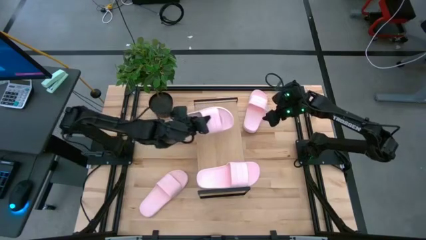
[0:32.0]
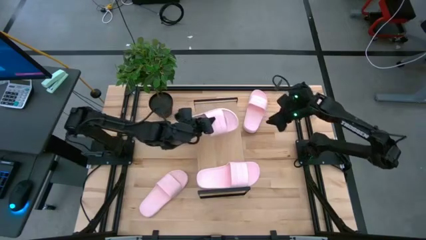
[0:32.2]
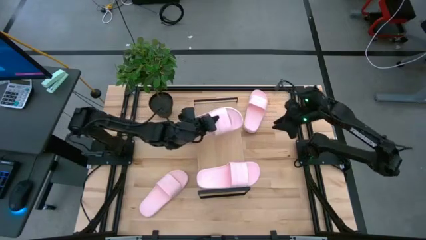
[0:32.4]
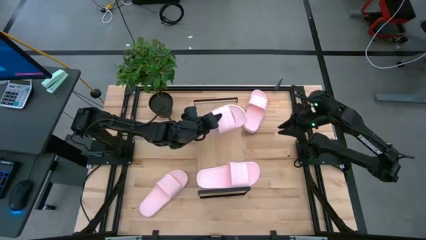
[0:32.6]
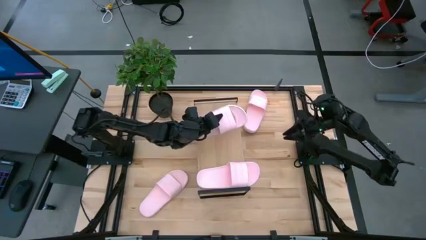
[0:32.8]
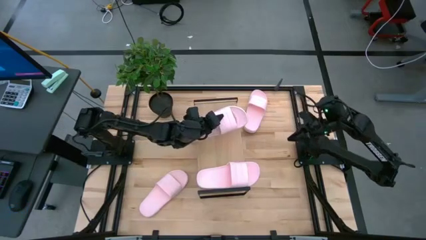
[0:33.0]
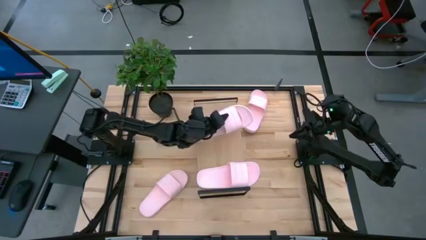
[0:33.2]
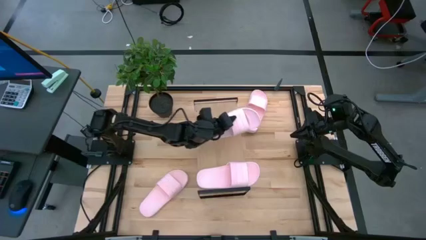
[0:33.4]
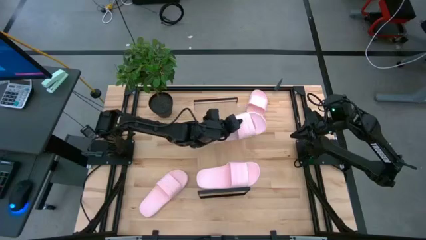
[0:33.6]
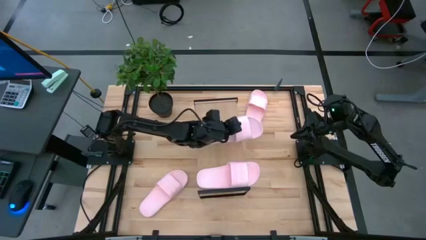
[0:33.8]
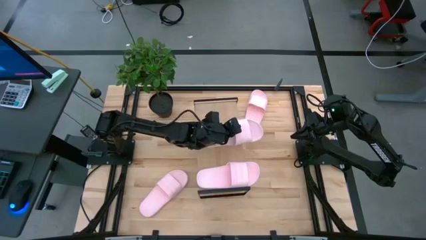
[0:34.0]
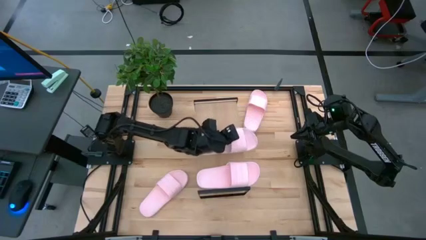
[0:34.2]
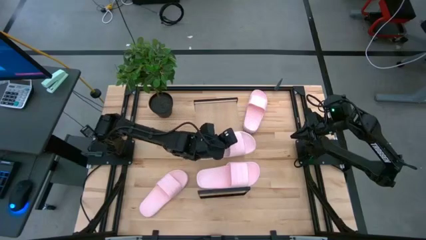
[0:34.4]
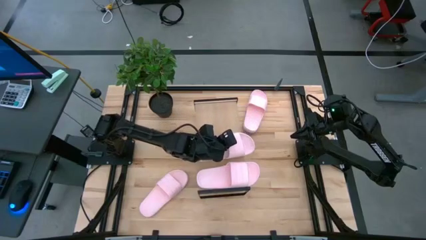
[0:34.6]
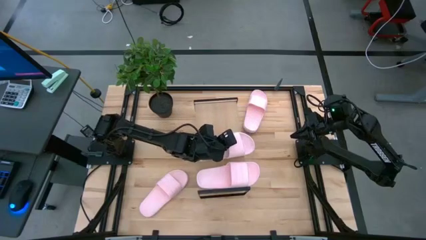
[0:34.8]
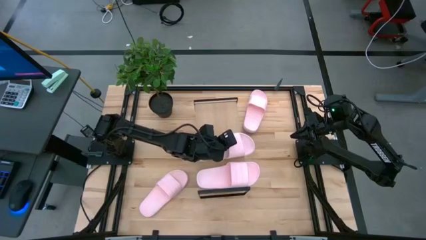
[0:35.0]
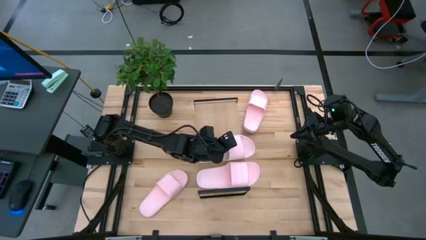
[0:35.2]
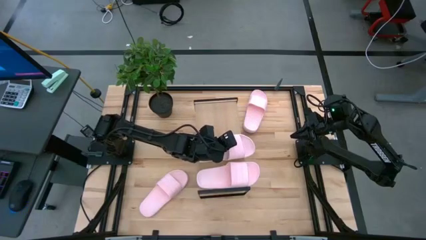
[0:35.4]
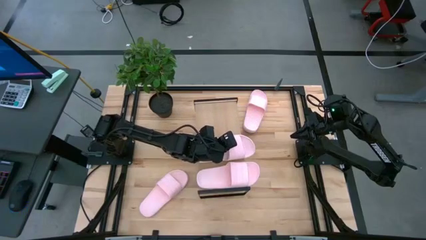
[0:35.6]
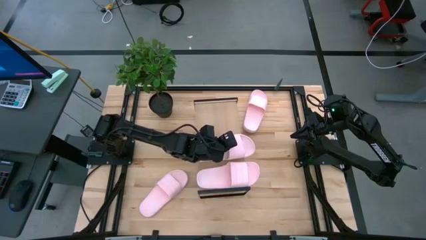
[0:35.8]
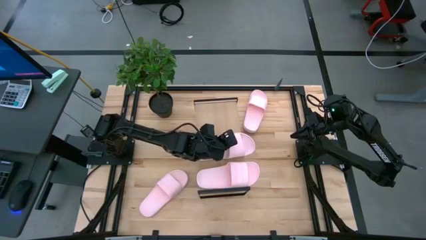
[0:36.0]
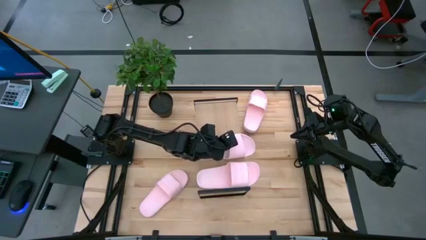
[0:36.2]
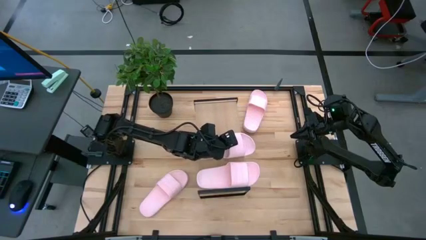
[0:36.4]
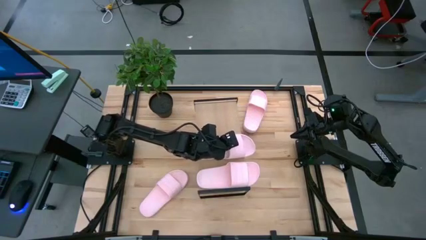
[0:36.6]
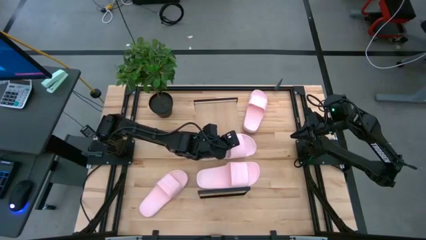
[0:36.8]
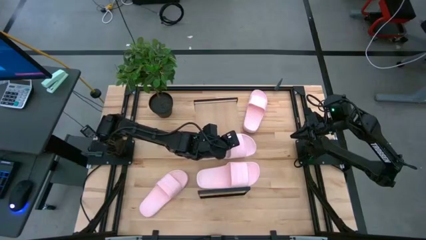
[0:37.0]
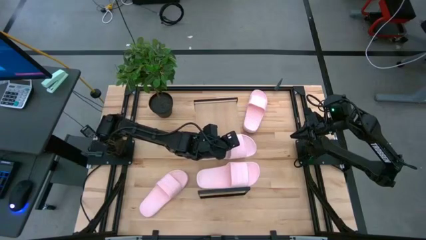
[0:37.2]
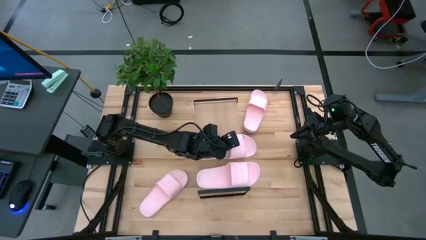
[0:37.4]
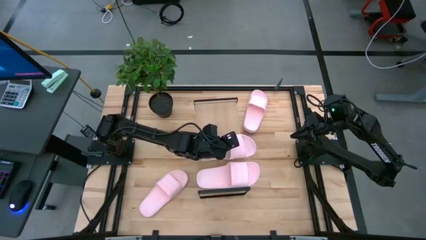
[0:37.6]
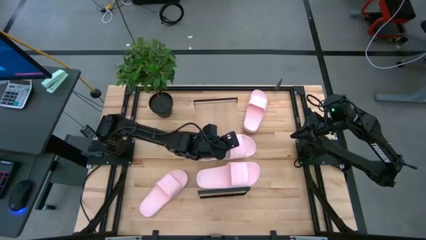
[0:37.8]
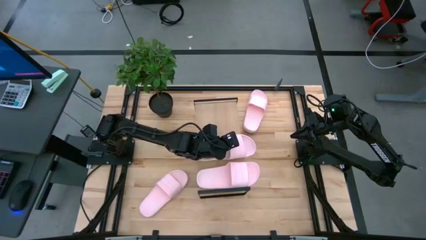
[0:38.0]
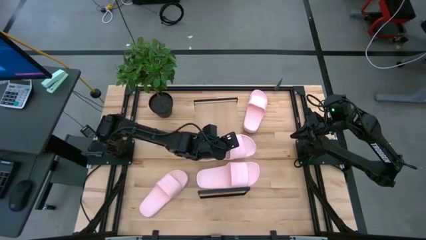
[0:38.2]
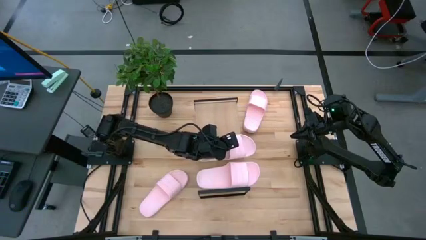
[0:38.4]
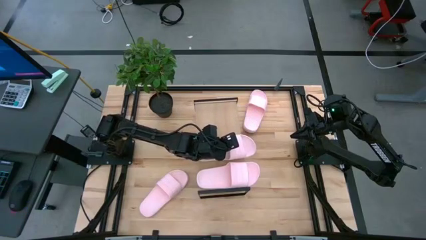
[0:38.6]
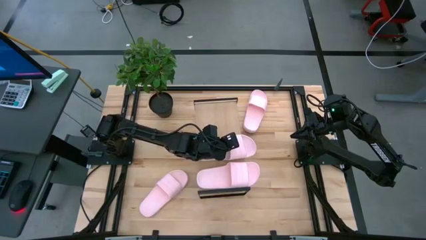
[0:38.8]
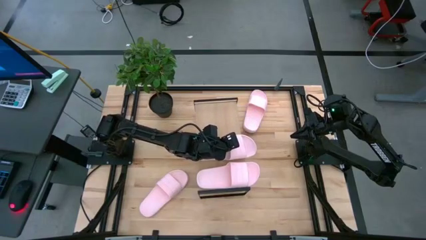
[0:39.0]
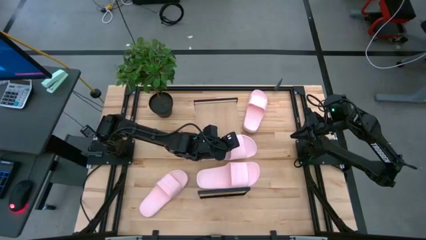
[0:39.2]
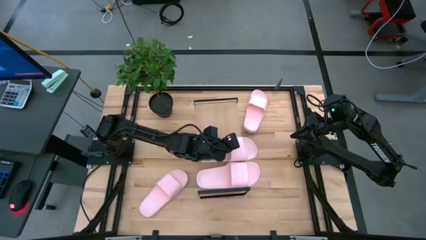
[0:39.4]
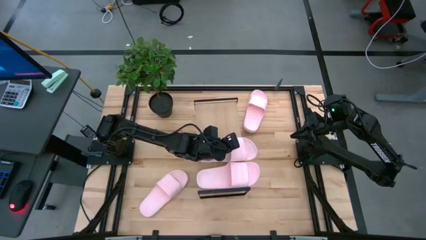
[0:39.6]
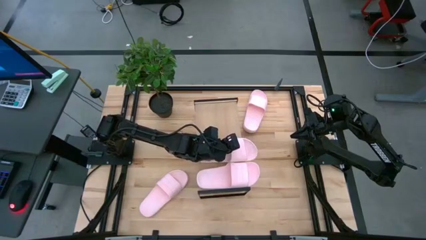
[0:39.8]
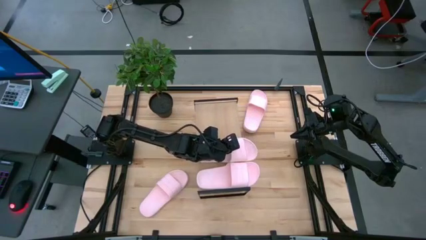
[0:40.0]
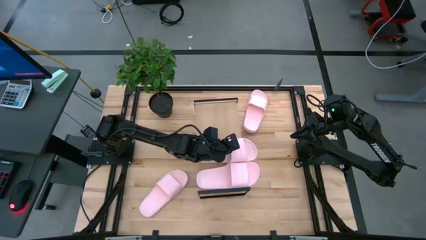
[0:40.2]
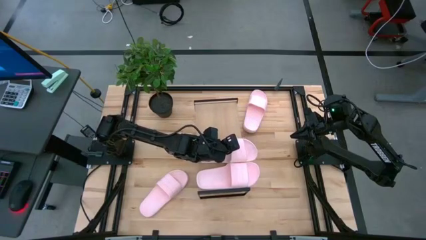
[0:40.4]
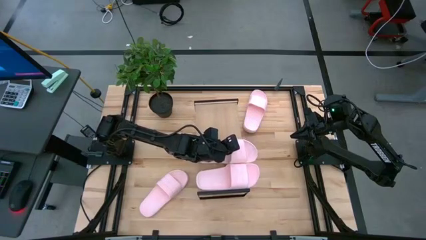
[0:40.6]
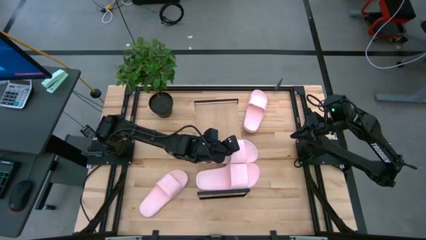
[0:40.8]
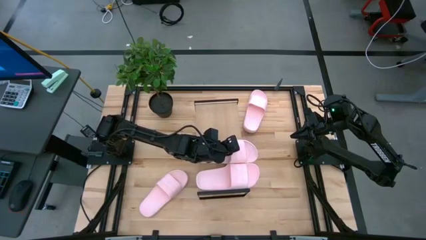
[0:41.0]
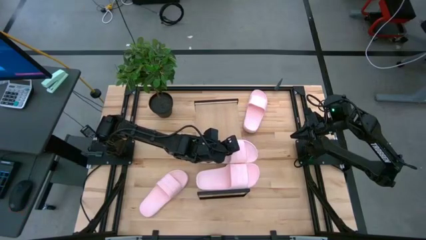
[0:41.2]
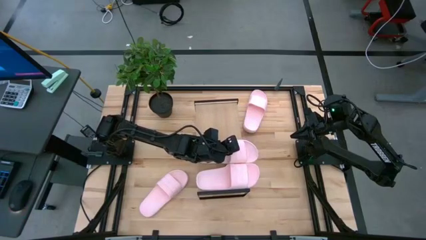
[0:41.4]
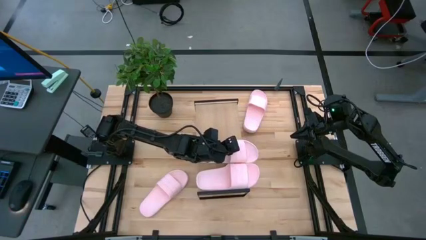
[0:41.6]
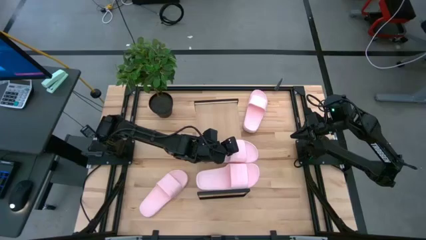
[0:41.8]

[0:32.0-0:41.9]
Task: Pick and place slides into the shelf
Put the top left pink slipper on the shelf

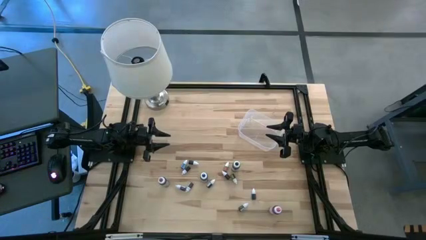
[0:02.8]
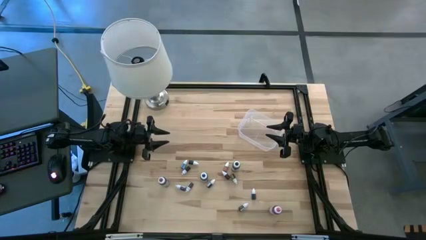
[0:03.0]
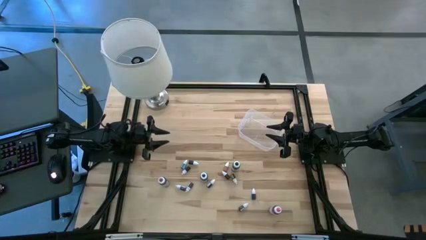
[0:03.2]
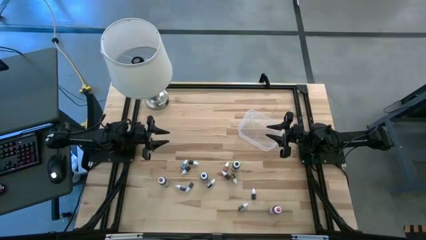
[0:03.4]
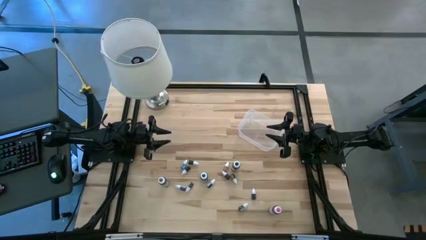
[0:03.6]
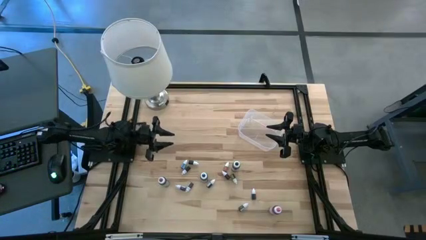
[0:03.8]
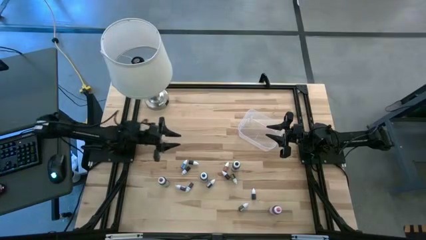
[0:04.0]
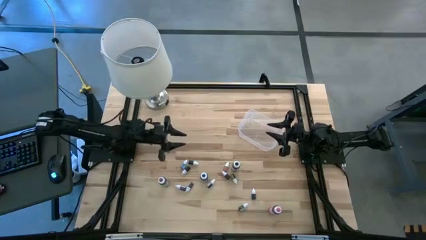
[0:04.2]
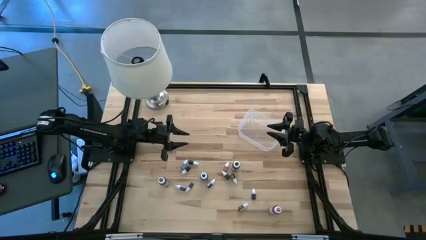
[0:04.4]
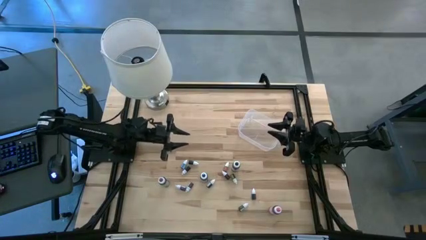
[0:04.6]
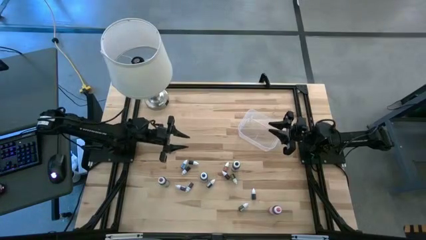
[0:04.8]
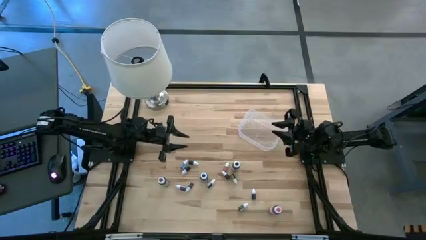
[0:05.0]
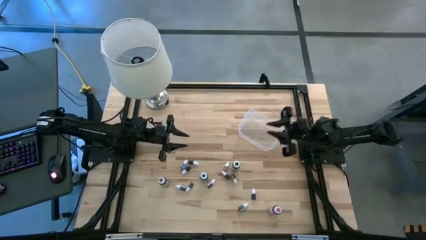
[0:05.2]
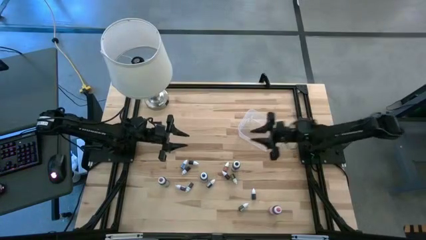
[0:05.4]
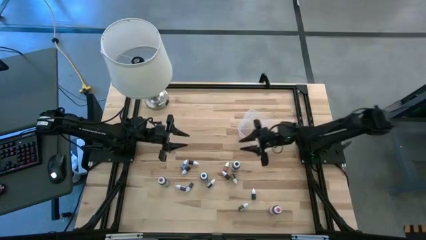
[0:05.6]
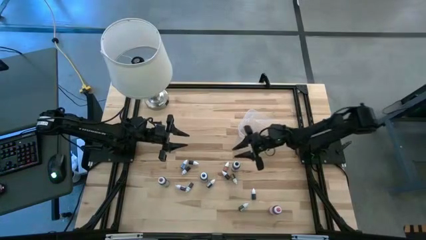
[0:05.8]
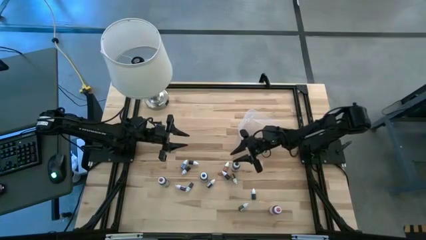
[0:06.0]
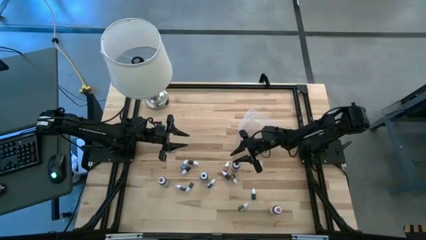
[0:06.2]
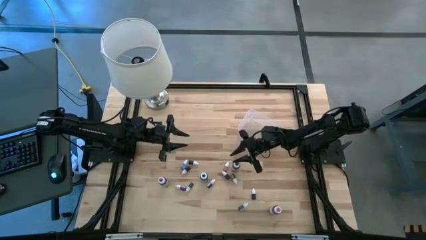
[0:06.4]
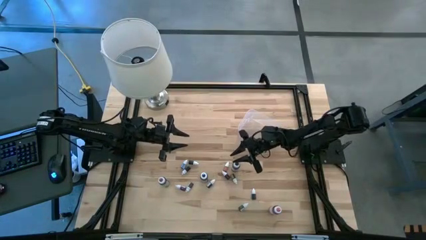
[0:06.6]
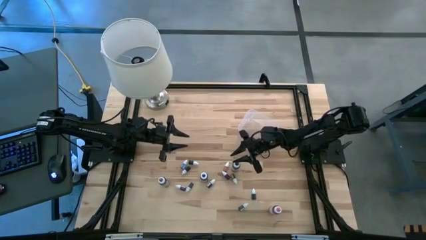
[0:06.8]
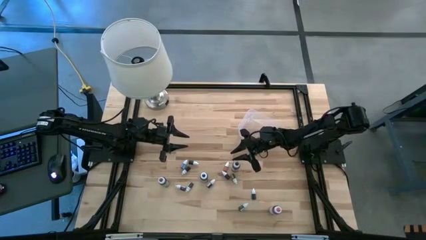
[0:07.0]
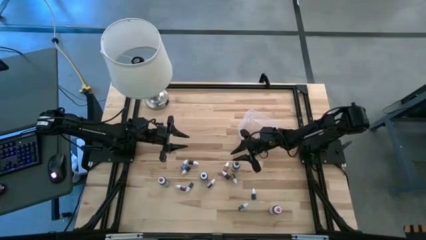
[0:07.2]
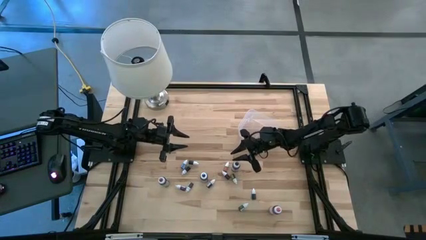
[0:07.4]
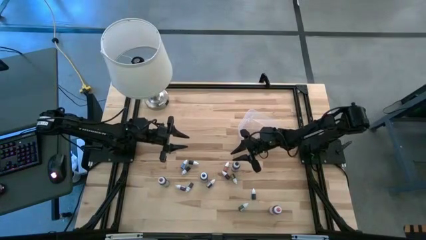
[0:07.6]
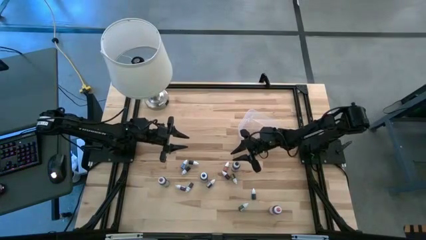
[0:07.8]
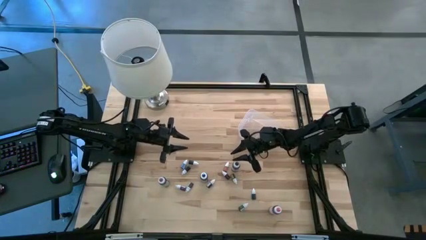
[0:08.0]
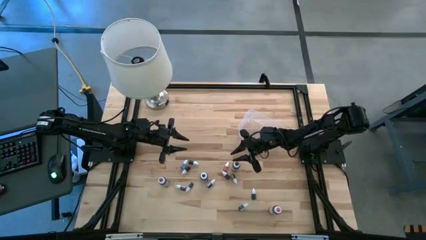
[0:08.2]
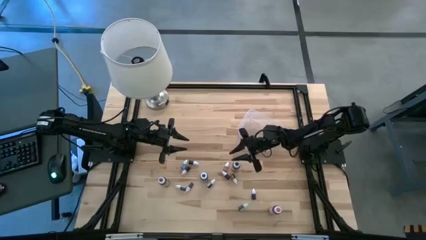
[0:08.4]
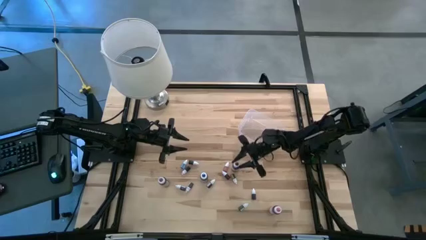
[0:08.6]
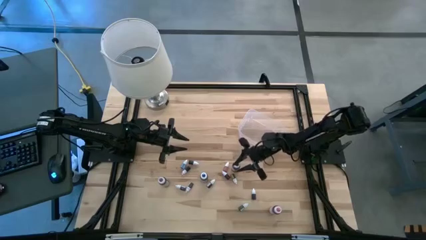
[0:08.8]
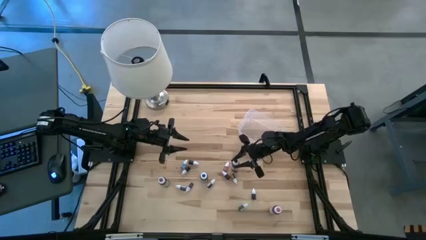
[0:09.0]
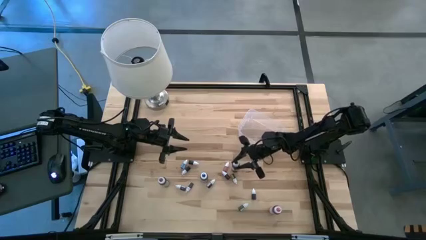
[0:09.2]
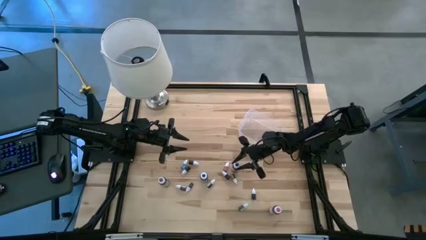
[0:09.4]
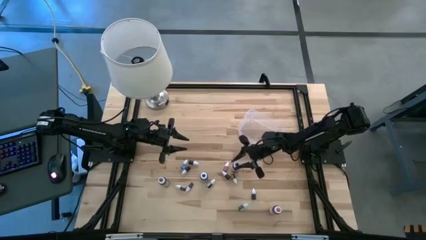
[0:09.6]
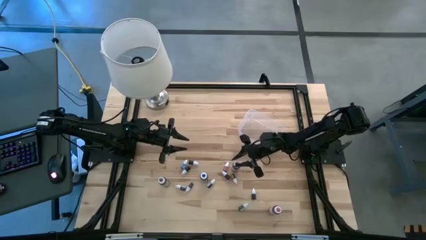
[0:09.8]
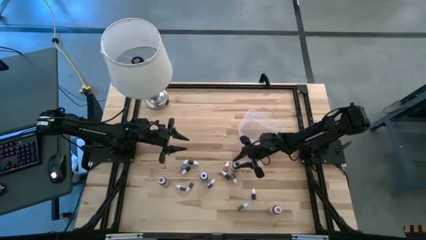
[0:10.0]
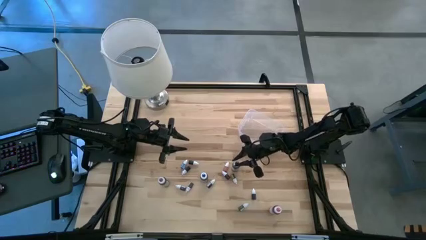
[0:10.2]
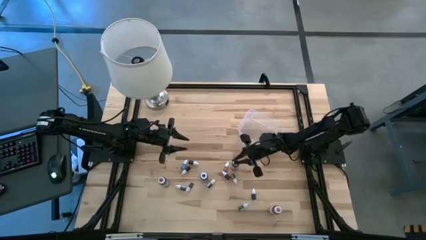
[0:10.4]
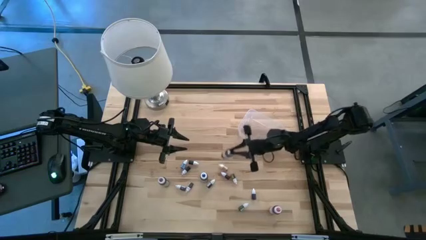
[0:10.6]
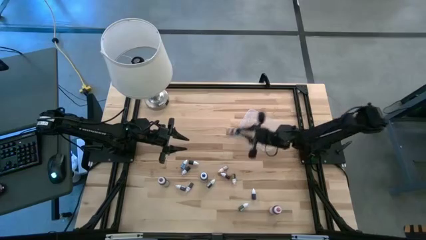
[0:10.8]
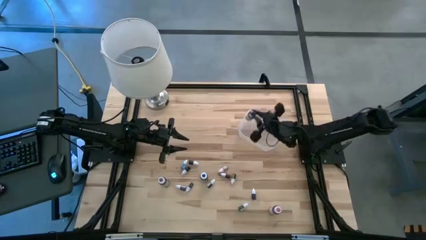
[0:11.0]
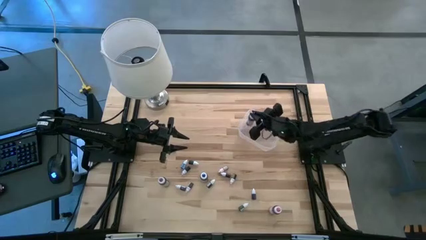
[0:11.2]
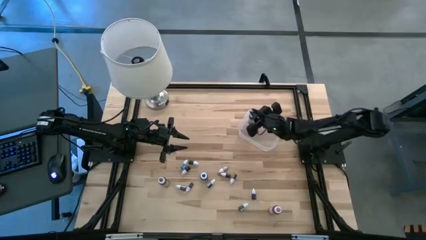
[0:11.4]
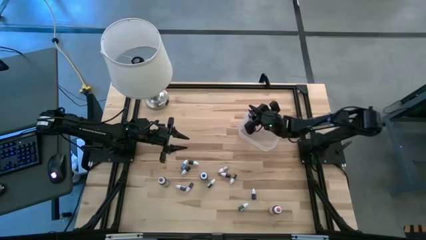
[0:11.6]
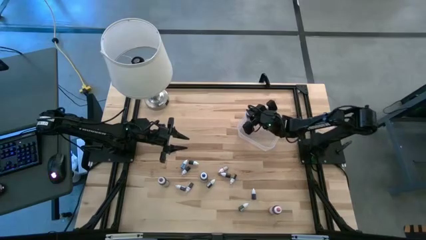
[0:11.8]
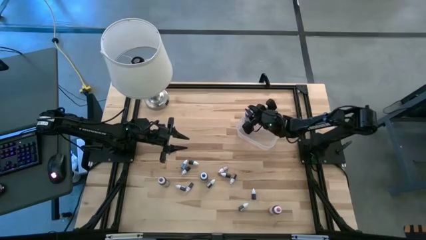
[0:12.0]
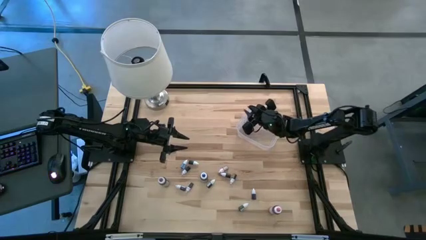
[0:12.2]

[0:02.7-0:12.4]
Task: Pick & Place food coloring
Put the large black food coloring bottle into the transparent bin
